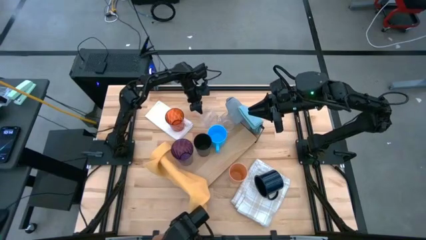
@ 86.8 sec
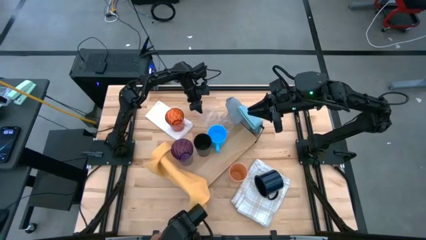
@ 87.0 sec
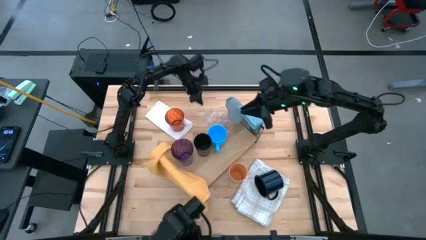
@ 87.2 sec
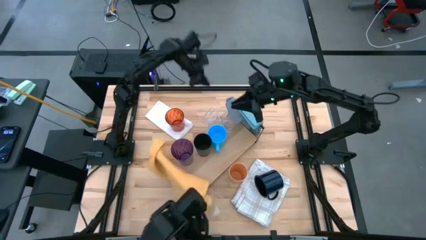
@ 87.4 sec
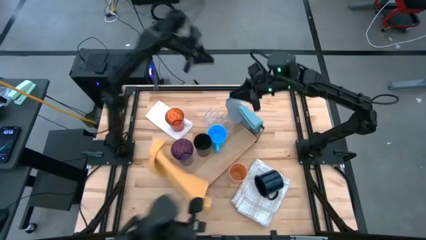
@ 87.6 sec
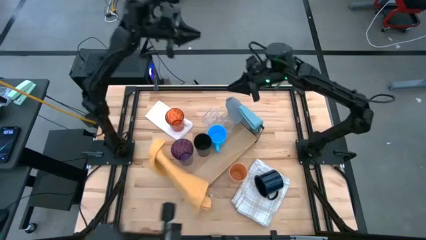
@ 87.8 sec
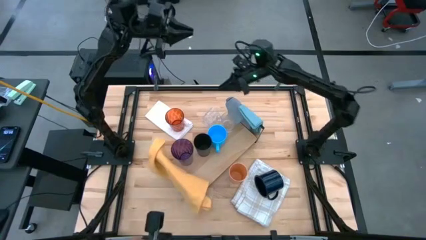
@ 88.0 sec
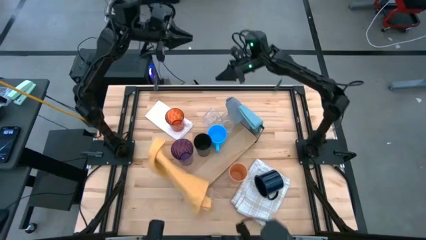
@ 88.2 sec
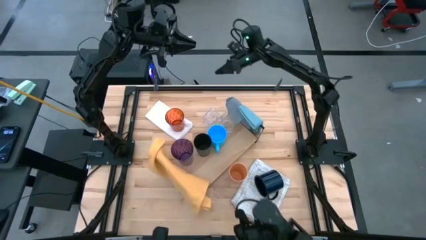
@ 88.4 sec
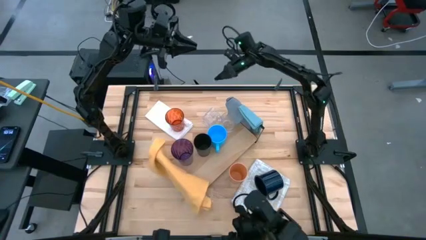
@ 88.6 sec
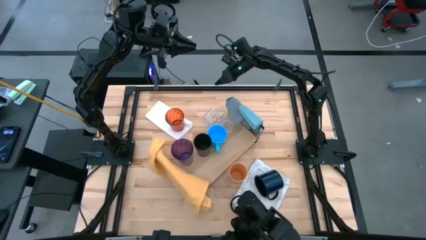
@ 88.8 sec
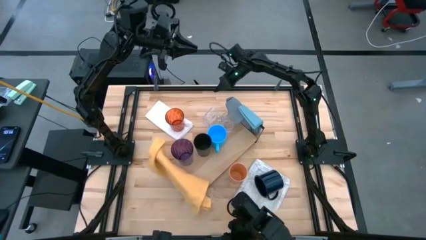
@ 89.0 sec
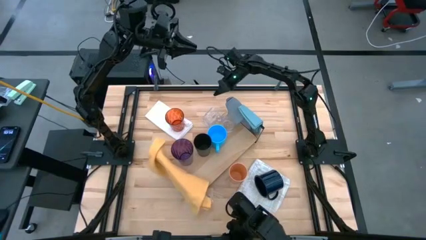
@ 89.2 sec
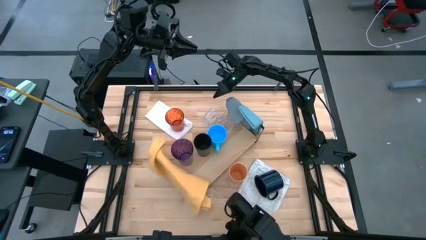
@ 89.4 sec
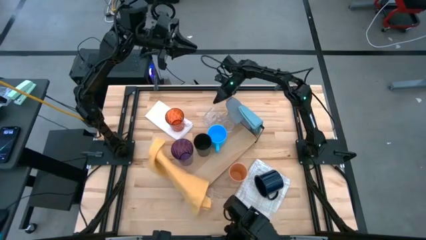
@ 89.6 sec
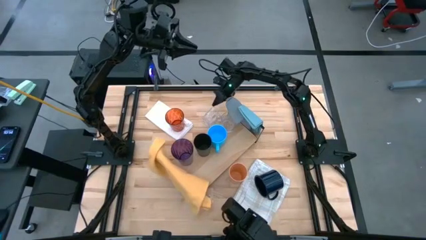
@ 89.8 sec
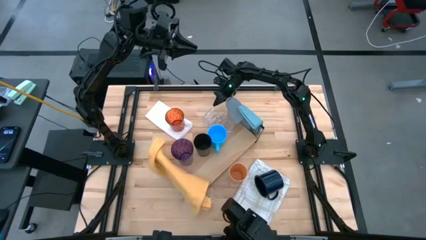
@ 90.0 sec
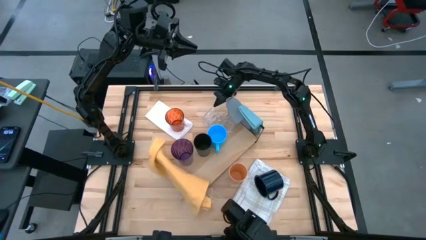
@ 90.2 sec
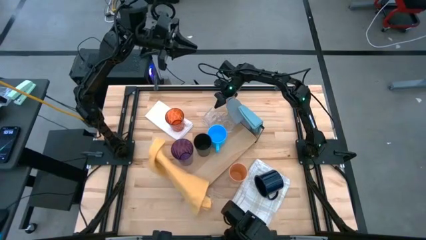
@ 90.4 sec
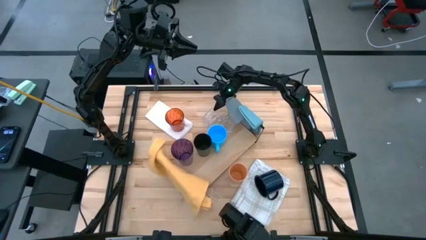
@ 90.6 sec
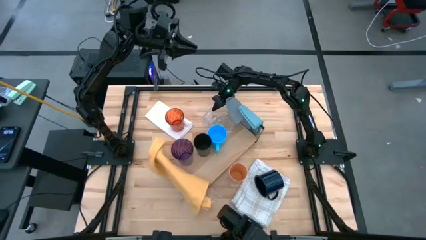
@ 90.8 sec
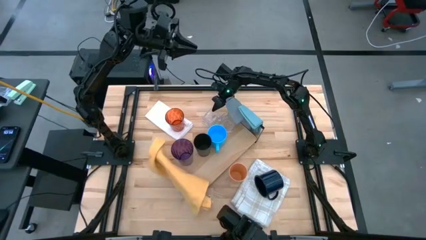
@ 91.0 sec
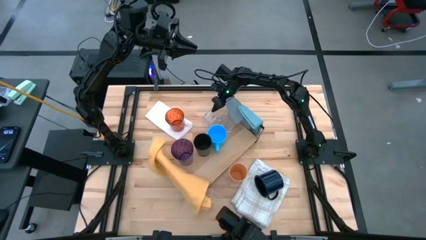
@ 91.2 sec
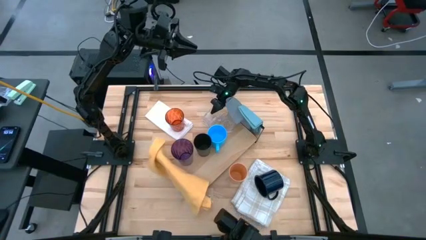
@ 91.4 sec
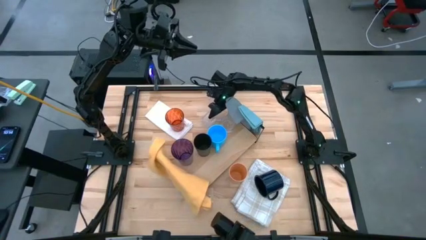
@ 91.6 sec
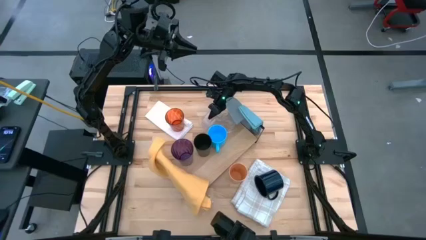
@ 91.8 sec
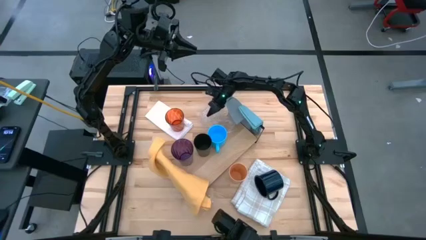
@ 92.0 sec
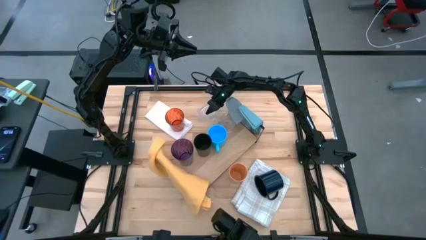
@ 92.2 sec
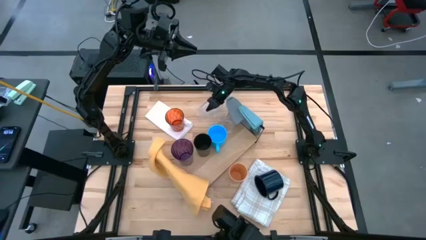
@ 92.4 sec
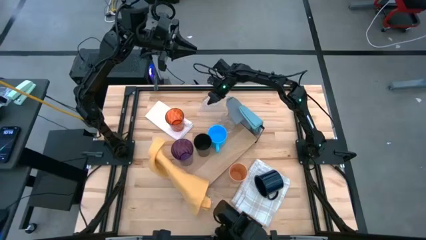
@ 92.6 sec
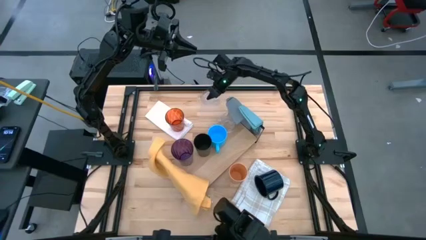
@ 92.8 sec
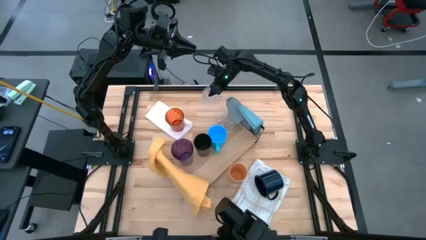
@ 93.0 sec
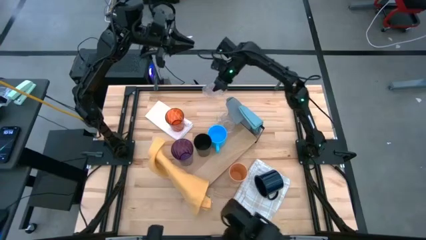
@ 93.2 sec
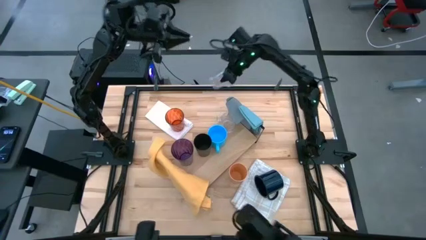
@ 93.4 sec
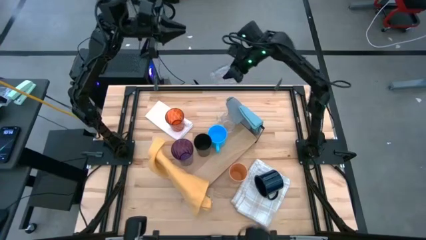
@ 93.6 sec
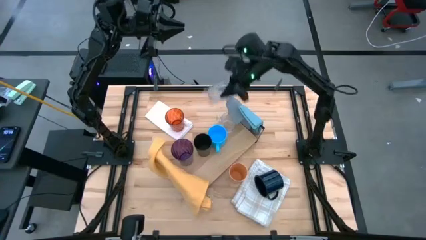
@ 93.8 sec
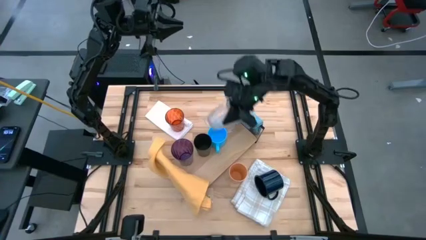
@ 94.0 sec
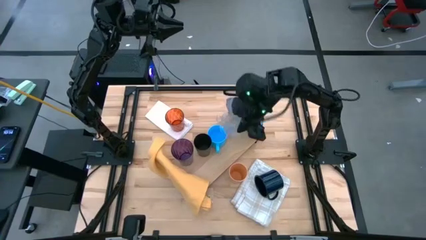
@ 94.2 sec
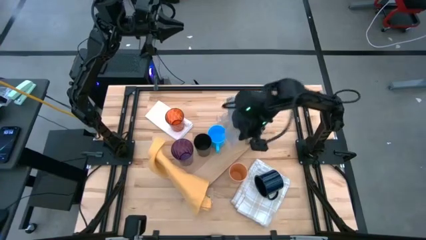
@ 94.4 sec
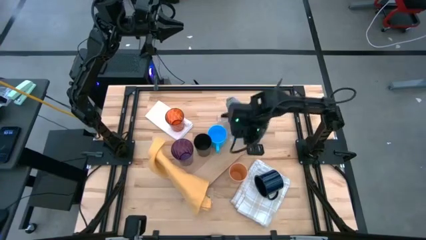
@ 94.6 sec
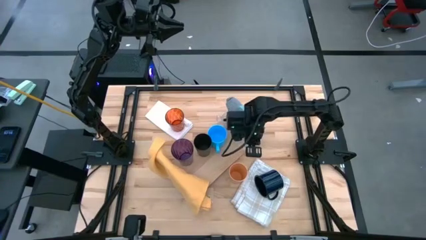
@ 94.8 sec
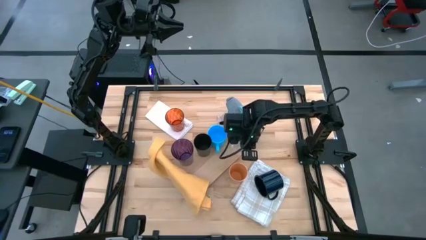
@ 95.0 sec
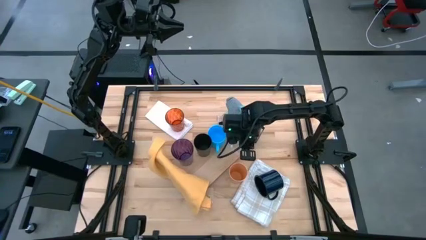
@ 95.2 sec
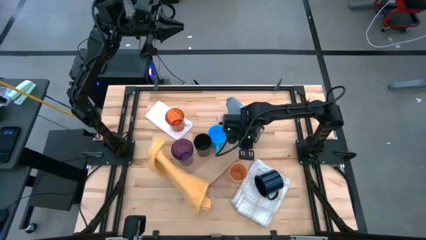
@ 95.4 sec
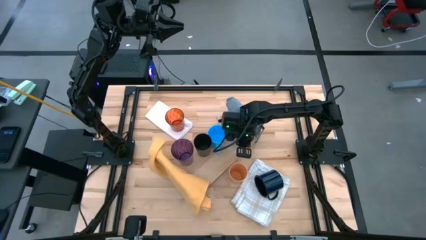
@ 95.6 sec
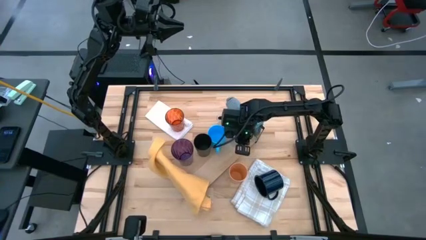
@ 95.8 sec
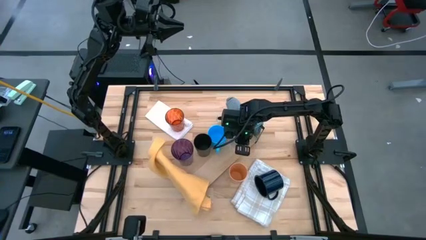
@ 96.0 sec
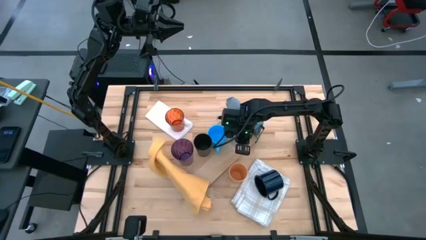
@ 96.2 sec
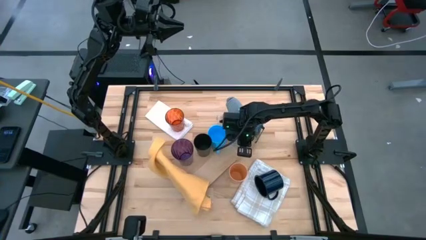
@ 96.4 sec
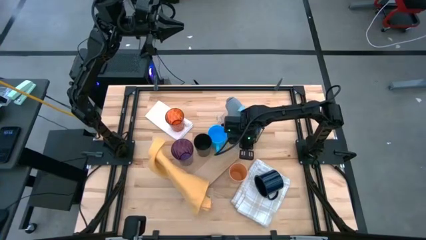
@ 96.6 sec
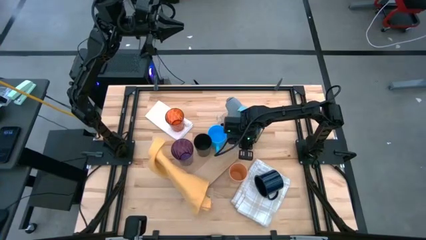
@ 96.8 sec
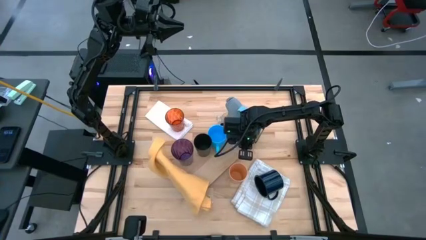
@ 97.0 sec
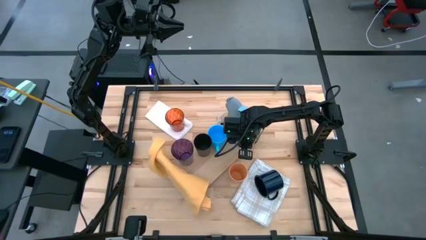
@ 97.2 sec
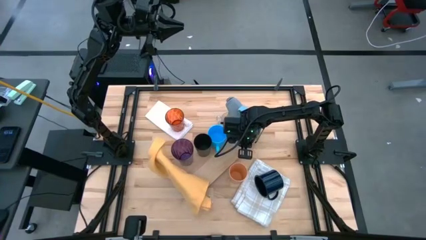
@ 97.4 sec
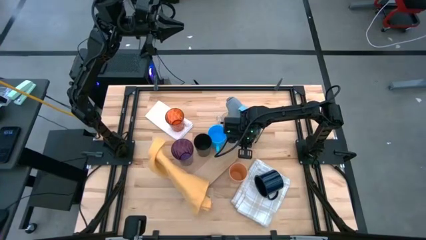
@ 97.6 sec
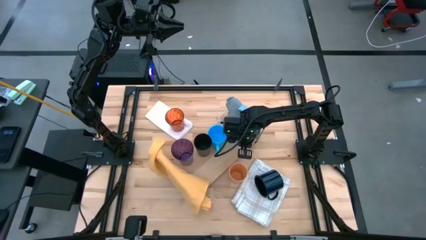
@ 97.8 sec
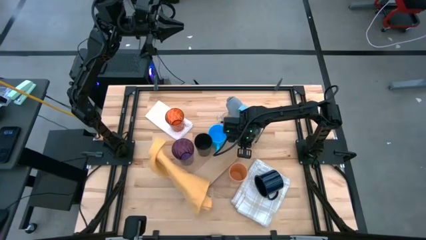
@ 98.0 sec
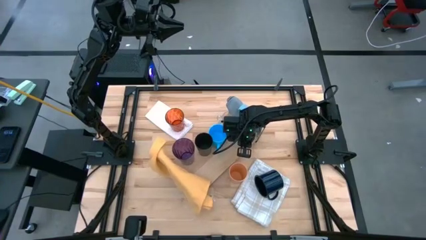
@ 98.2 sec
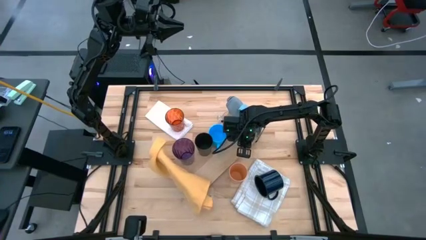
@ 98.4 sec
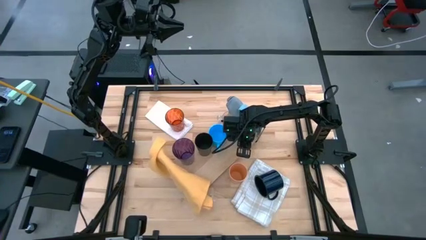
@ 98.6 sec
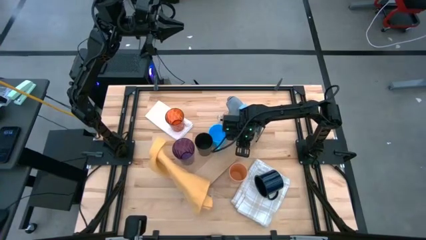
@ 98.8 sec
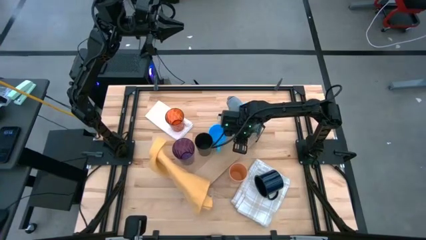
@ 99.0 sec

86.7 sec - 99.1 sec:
Task: Stack small to large cups/mugs on shelf
Put the transparent mug on the shelf
